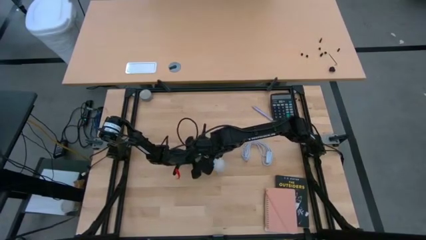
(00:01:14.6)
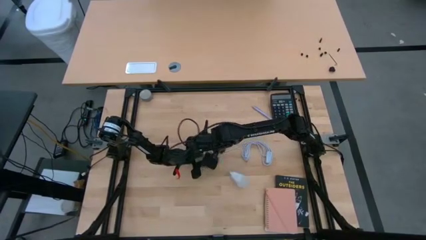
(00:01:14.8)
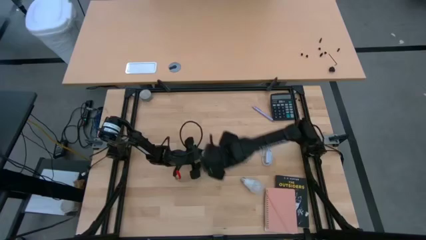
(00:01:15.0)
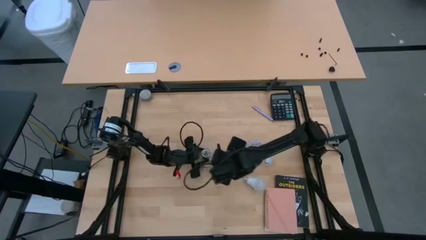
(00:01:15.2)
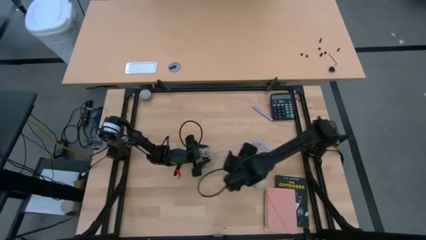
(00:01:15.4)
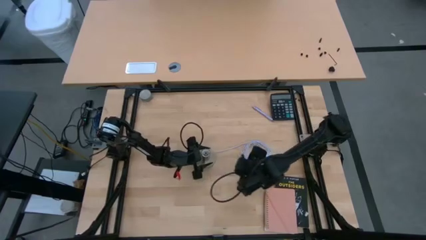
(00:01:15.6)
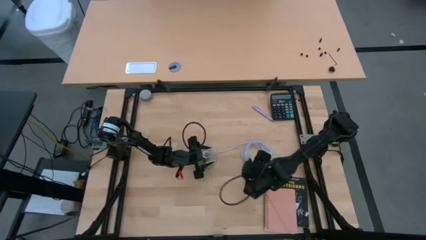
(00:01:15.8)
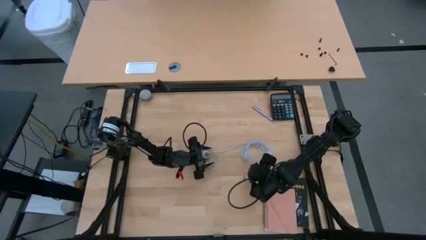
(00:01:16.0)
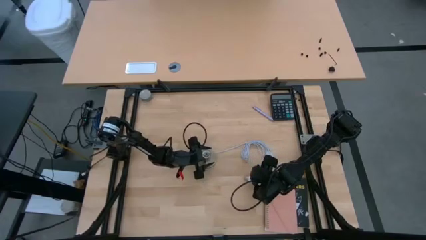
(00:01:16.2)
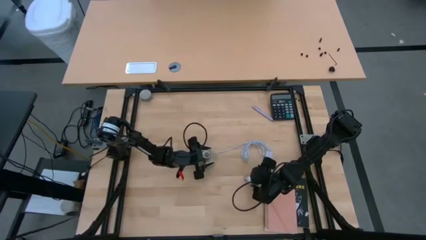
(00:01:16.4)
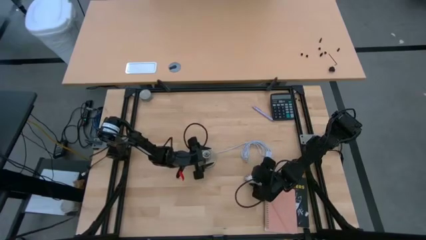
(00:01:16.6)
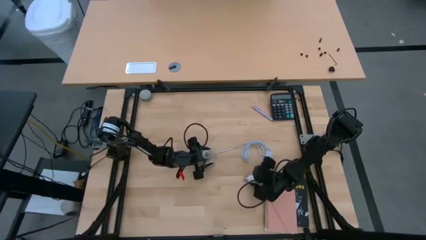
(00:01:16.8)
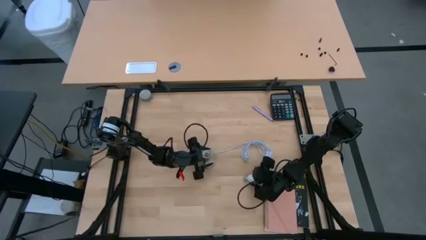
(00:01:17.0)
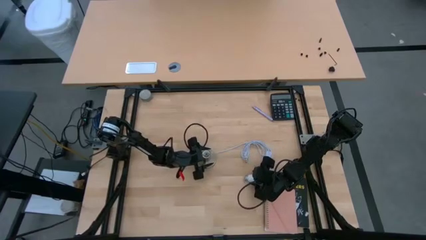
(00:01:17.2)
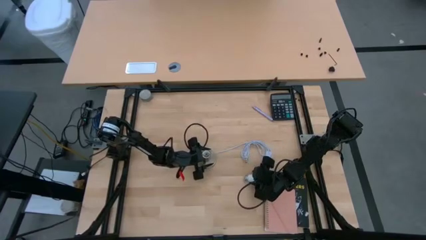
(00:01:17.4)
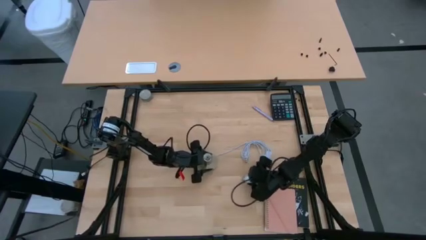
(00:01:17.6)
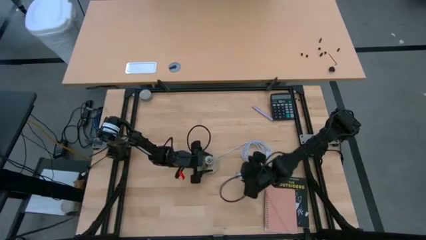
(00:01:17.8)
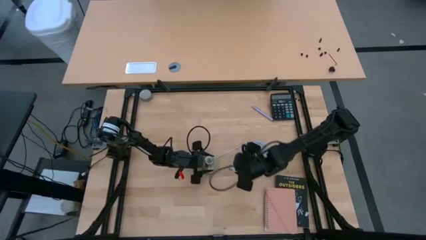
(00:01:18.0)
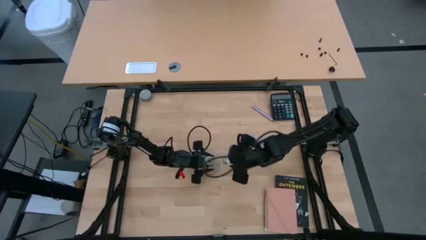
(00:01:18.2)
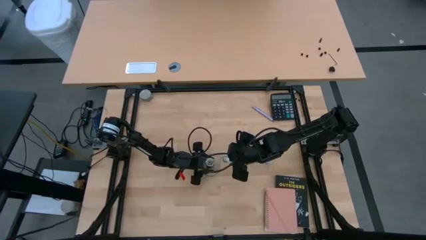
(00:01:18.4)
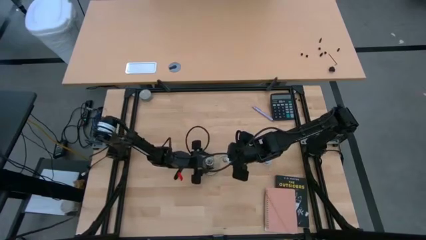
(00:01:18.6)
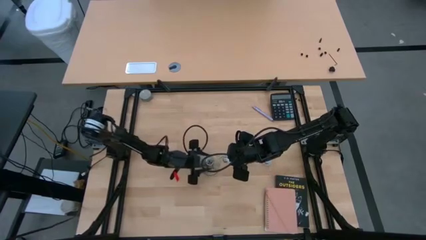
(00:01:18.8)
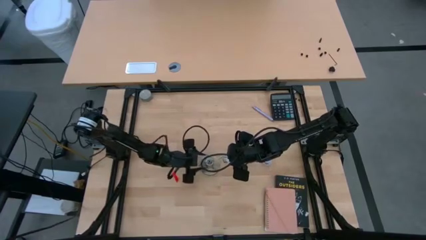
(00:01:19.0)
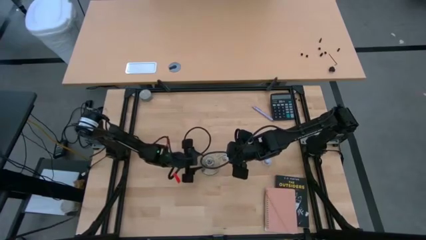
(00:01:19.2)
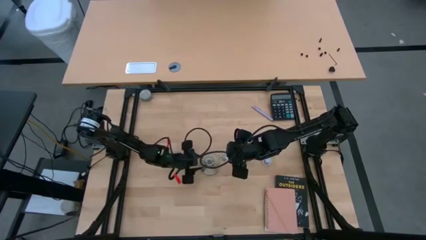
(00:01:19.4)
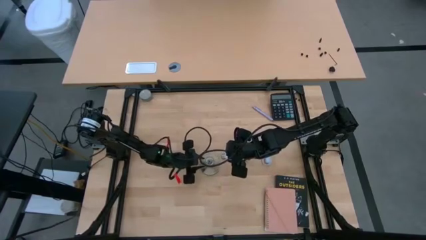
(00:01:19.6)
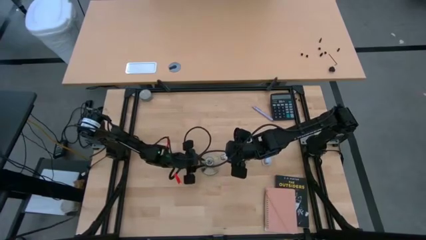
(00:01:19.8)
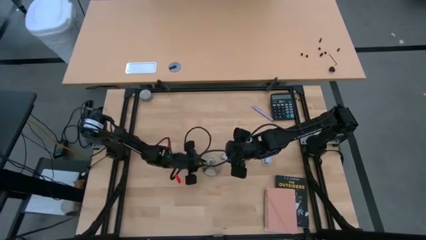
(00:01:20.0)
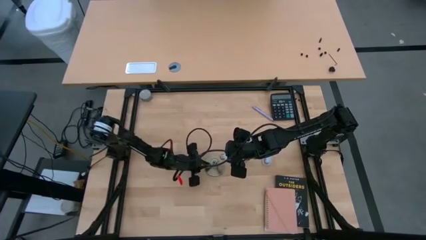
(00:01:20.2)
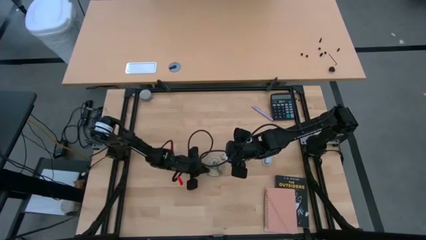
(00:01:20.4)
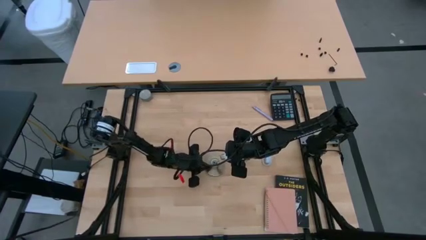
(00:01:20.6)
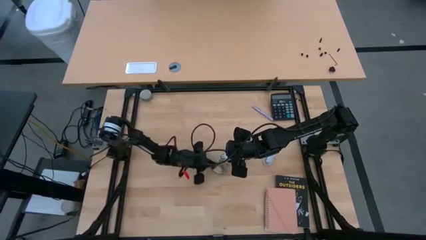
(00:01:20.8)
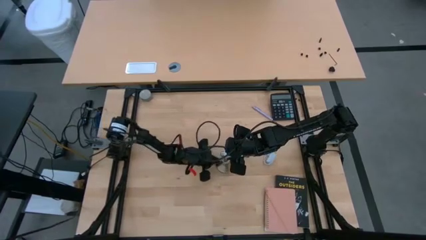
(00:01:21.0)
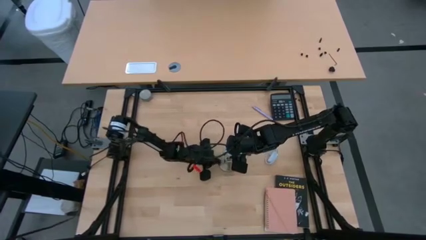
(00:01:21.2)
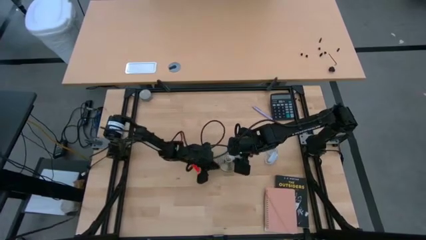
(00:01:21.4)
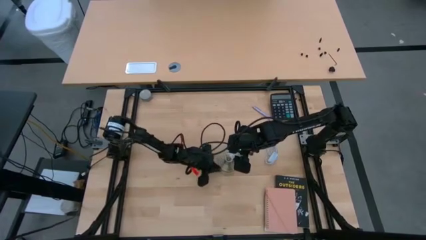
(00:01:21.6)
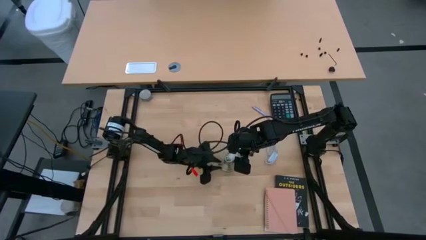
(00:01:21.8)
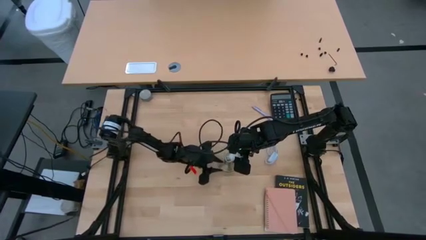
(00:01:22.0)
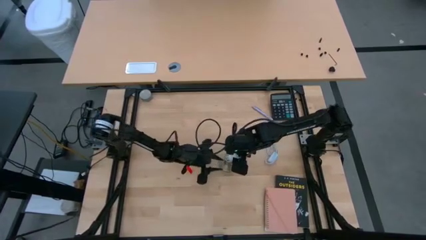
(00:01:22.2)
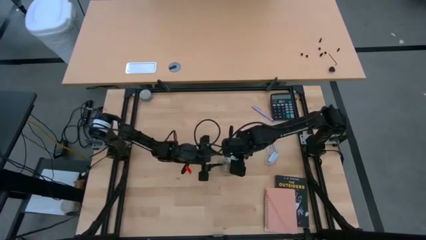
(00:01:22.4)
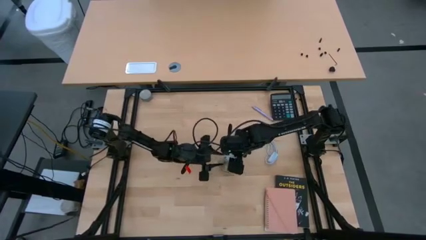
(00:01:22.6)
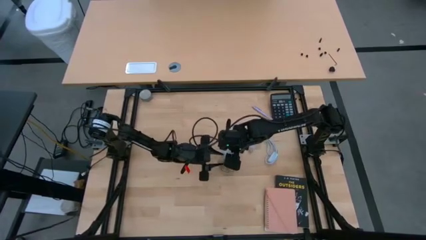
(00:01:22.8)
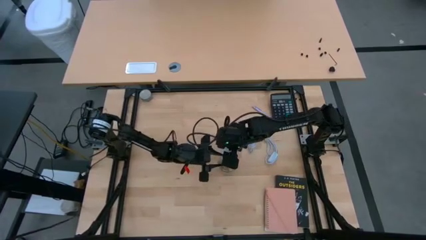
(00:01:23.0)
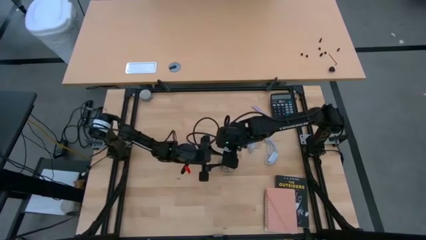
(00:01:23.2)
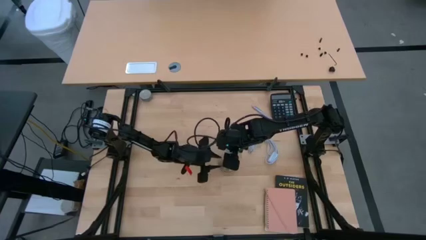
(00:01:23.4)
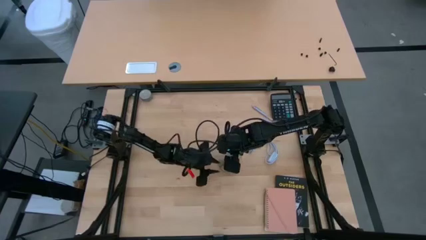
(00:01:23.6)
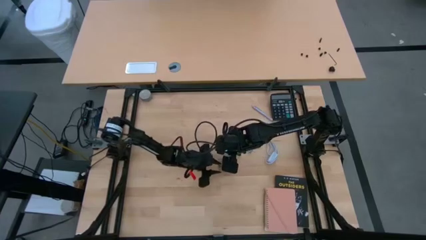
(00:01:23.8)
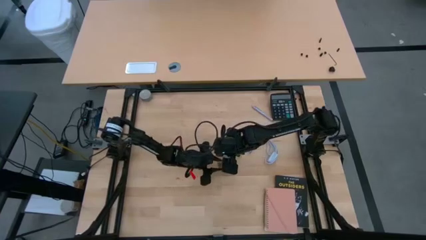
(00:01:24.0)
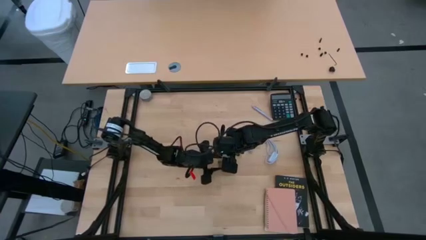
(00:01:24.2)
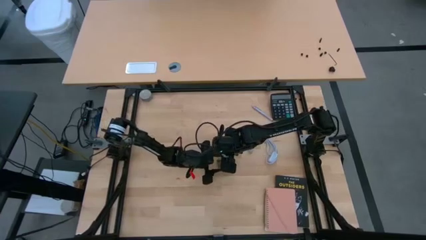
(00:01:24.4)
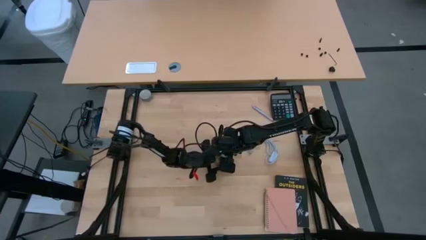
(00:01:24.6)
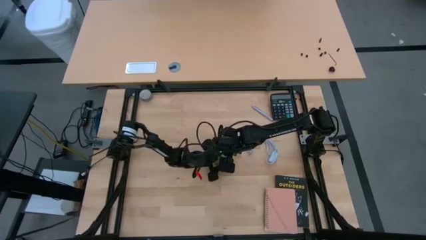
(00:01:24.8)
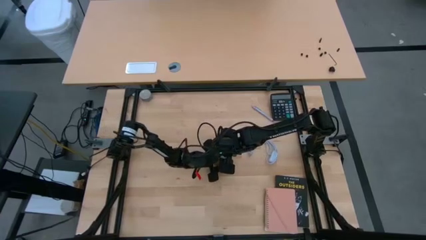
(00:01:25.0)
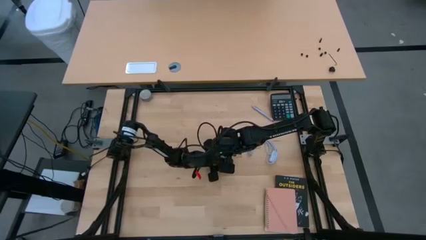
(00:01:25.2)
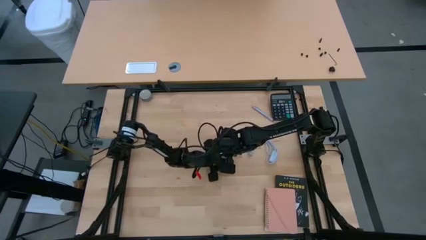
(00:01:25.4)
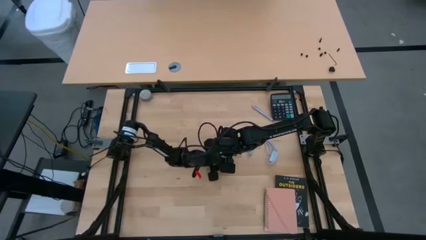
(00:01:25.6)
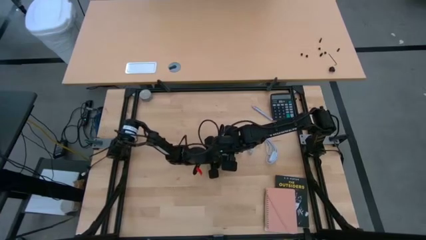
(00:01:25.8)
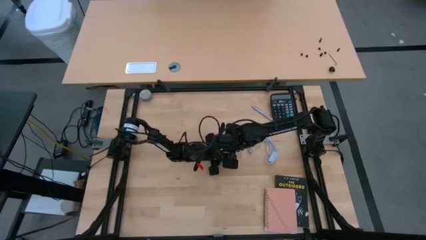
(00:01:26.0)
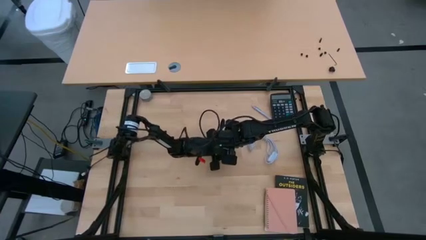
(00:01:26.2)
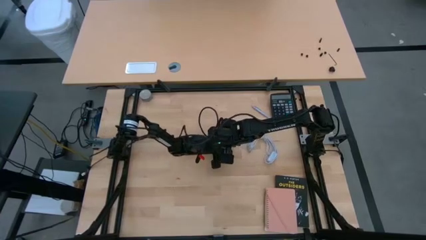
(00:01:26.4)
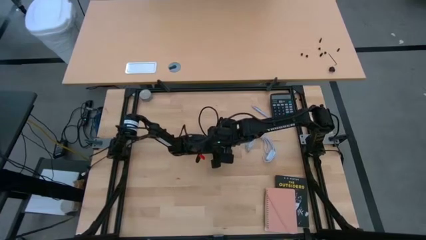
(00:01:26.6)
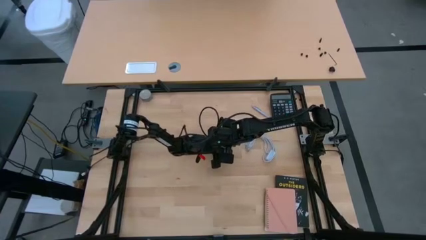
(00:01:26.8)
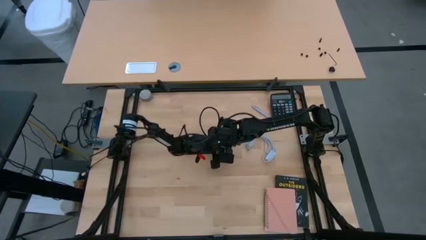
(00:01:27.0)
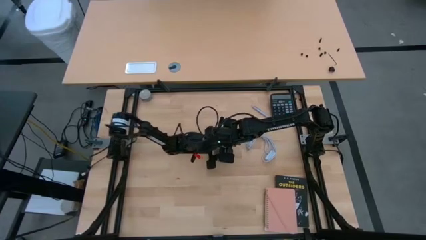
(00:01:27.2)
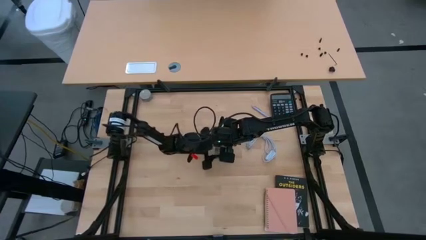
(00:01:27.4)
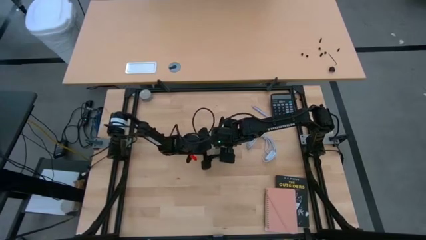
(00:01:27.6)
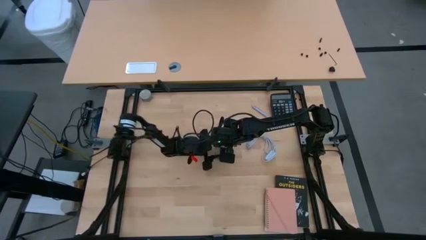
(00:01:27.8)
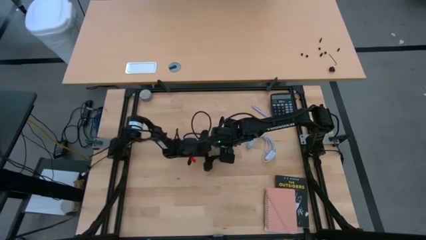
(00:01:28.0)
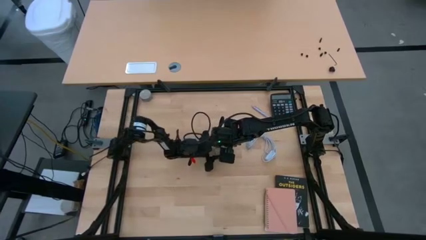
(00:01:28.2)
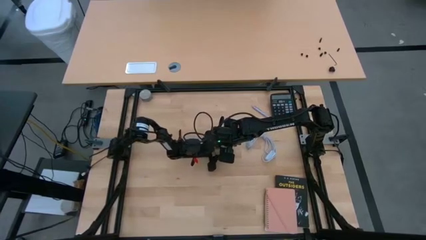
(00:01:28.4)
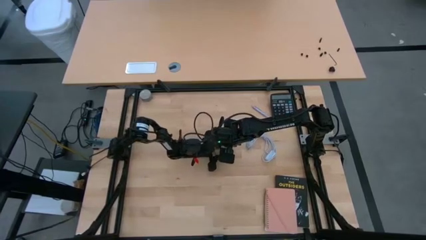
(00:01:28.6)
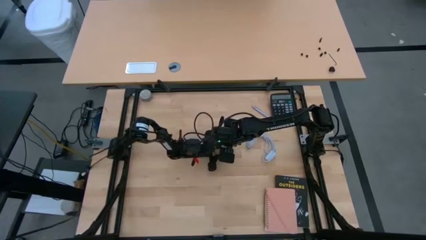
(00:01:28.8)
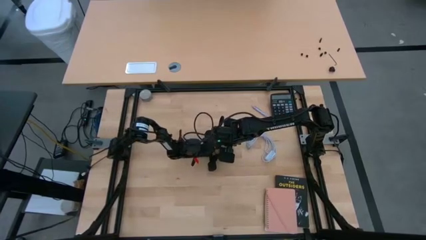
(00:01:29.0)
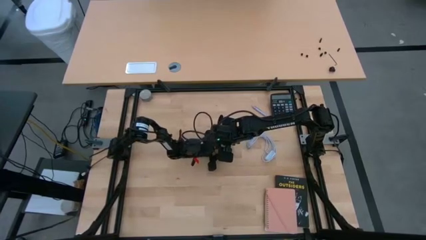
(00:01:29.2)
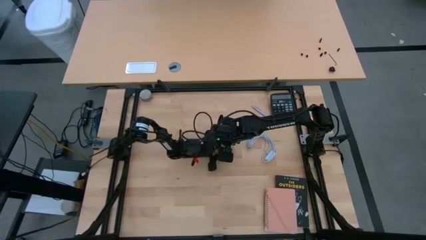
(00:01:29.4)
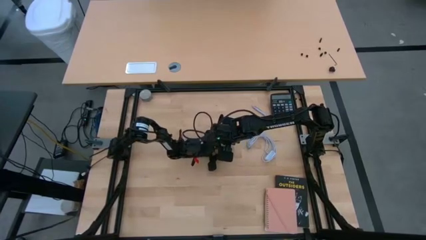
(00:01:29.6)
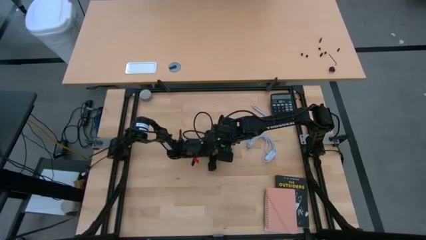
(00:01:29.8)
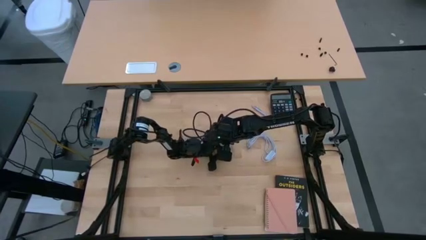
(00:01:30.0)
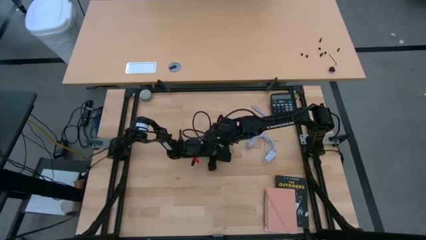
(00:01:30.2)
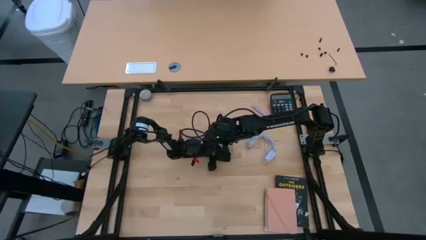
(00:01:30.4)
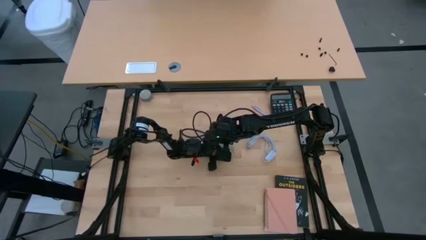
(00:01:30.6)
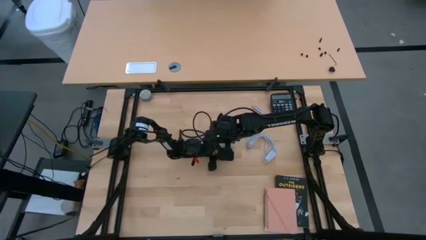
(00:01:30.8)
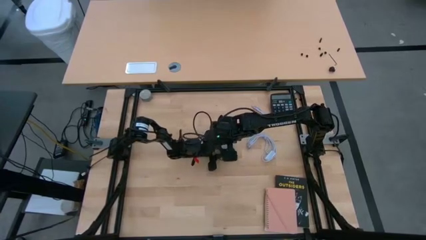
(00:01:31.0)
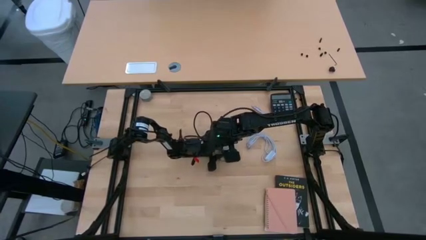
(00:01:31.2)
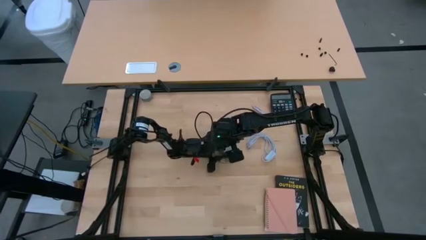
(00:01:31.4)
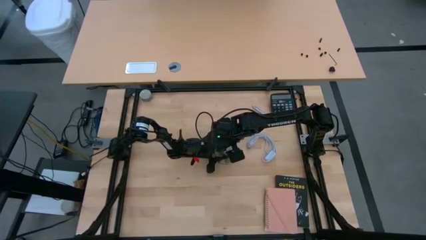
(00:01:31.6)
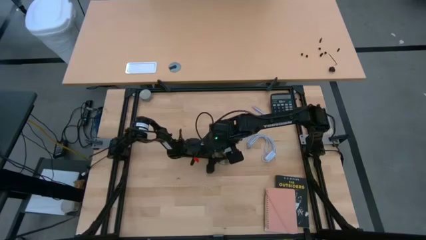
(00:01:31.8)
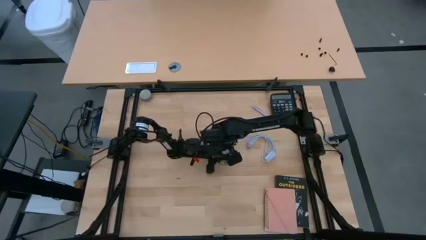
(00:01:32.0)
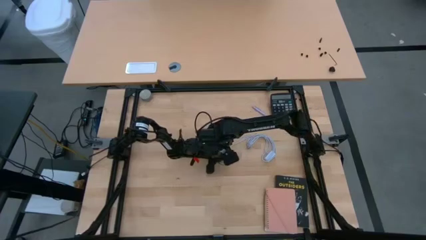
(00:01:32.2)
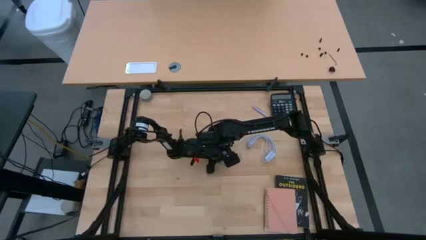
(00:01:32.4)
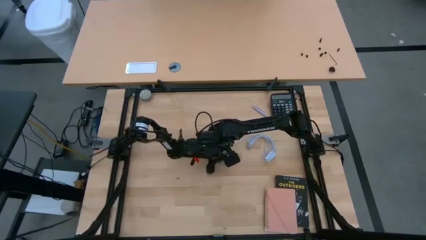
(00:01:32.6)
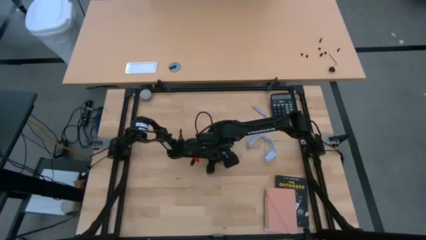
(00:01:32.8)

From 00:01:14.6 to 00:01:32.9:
Task: Screw lightbulb
Insert the light bulb into the lamp
